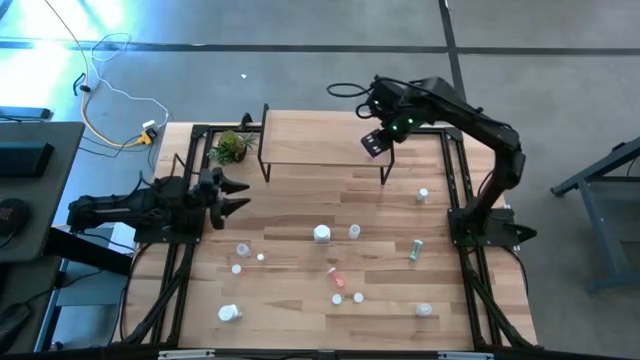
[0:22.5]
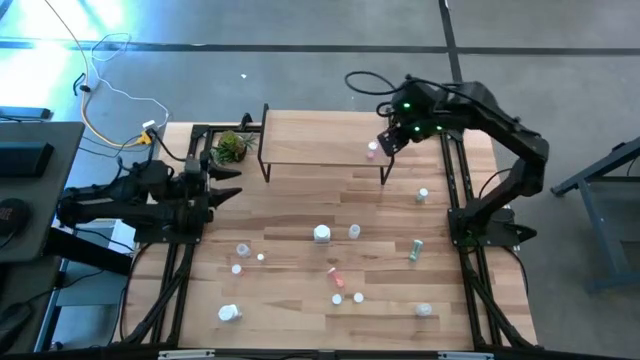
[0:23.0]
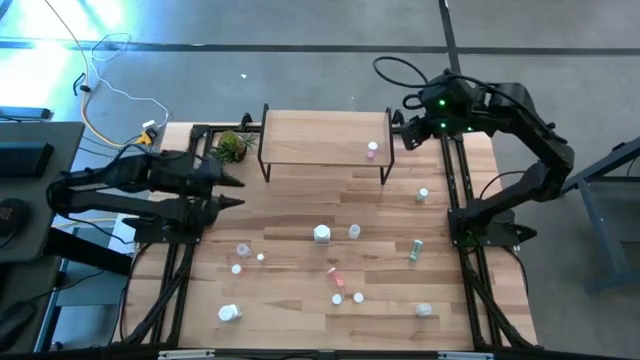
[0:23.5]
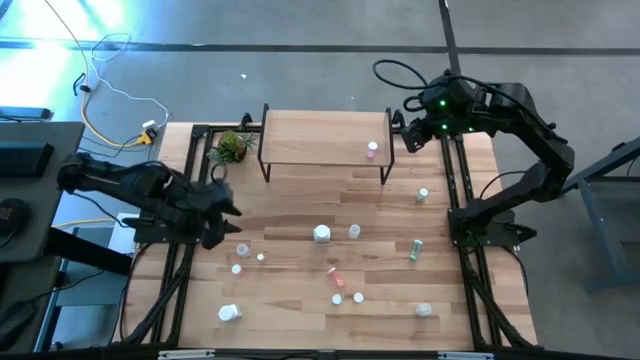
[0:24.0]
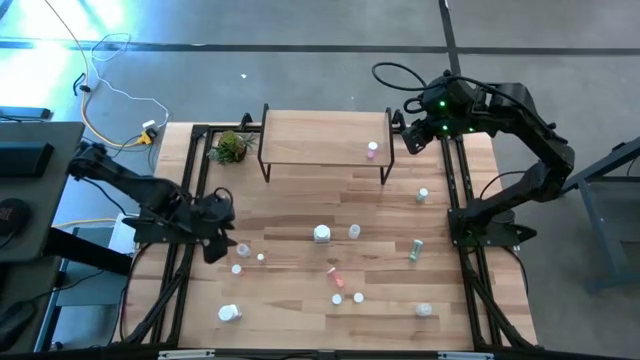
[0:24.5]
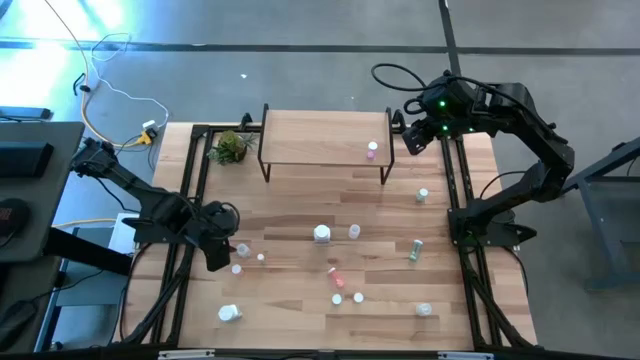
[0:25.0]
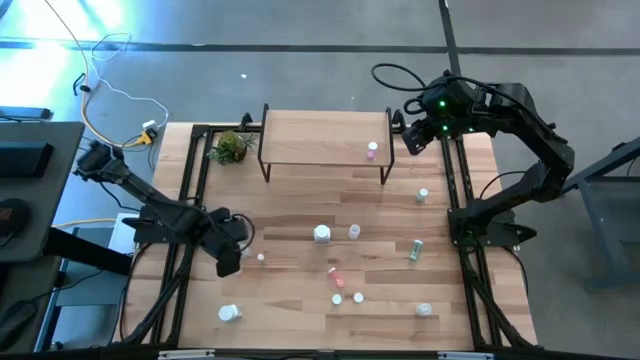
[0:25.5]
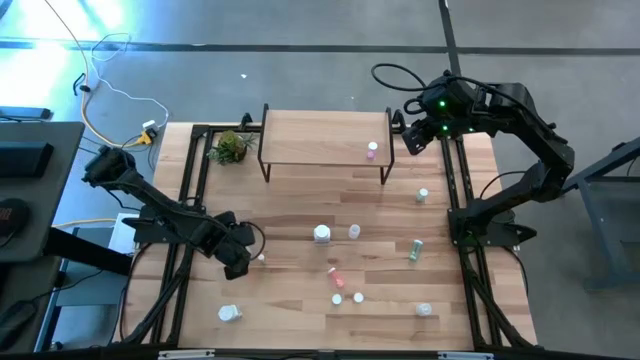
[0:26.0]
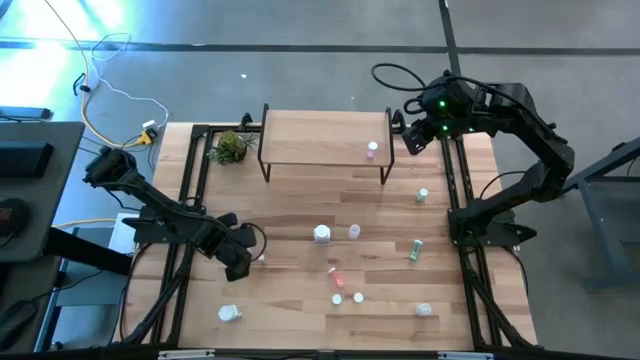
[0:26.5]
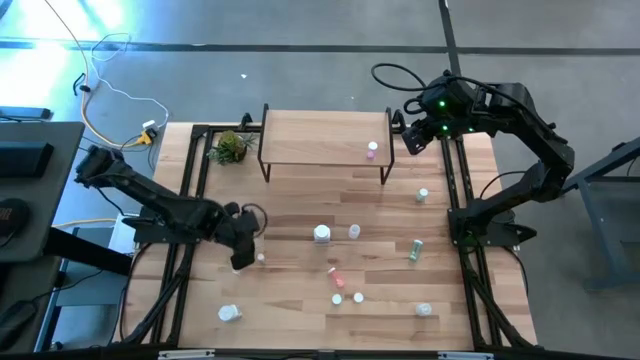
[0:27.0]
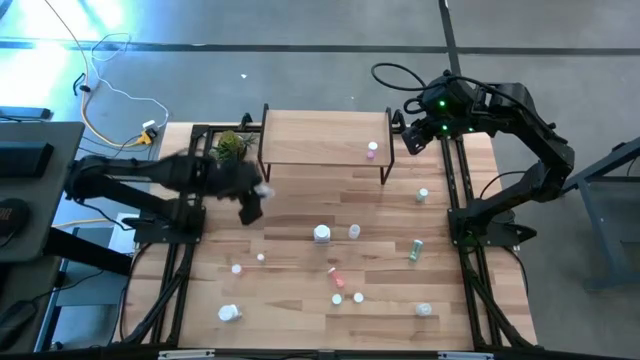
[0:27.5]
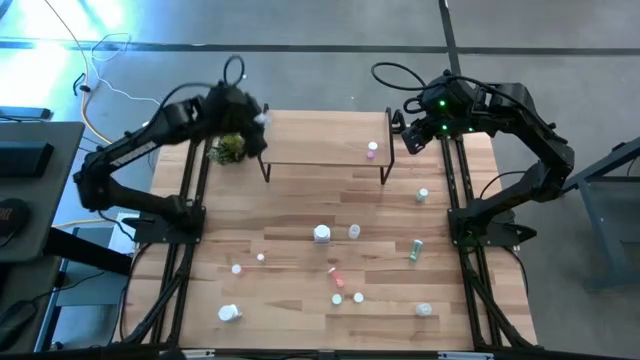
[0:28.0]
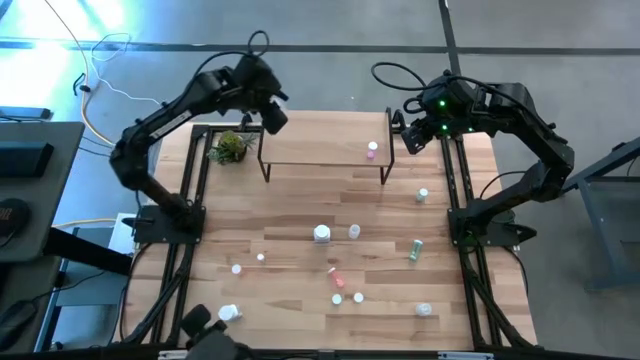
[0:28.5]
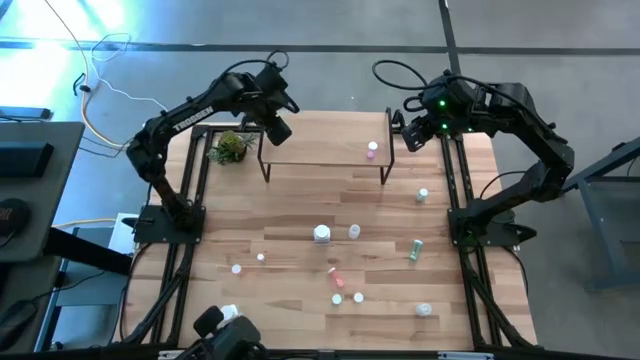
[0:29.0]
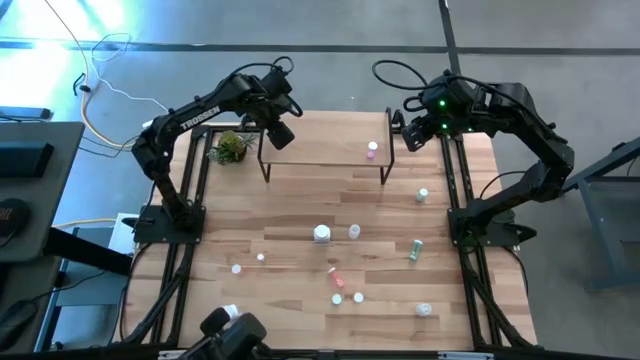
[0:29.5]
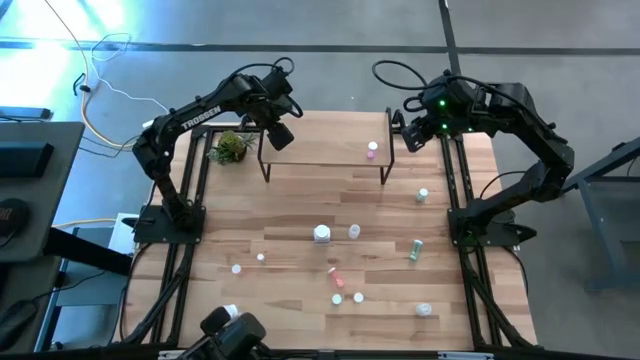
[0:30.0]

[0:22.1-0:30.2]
Task: Pick and place medicine bottles onto shelf by color
Put the right transparent pill bottle on the shelf

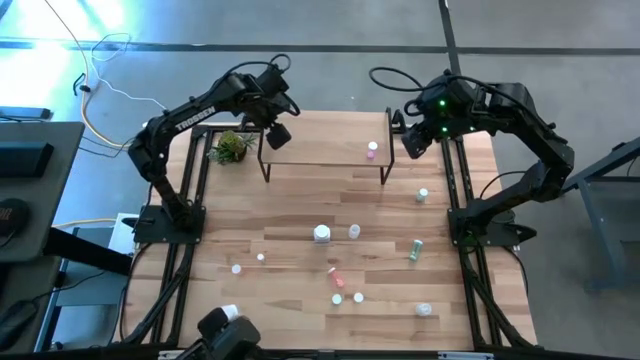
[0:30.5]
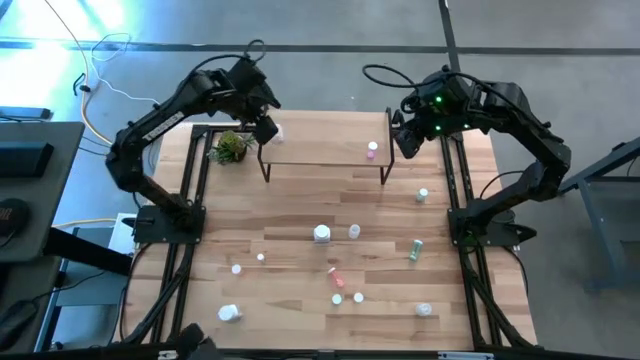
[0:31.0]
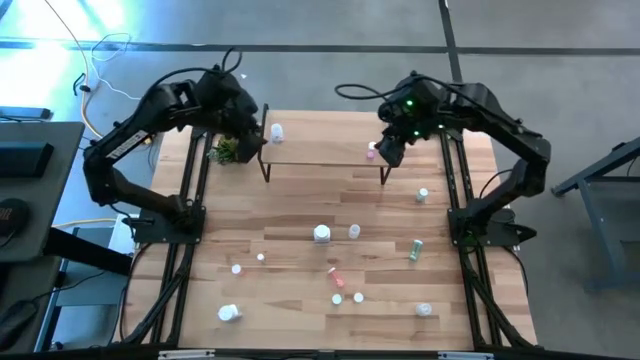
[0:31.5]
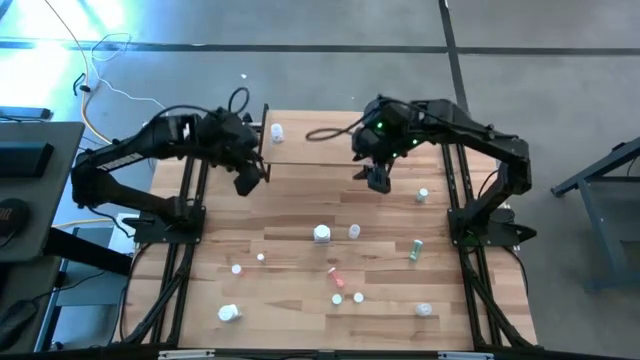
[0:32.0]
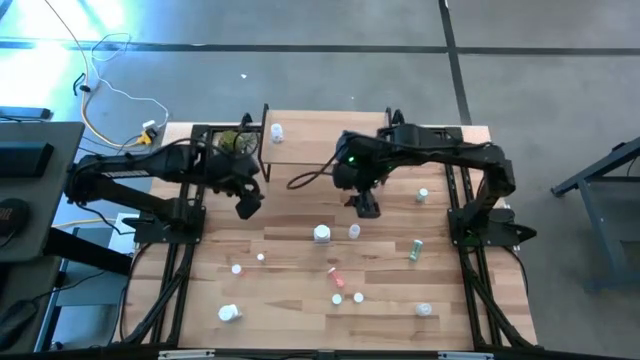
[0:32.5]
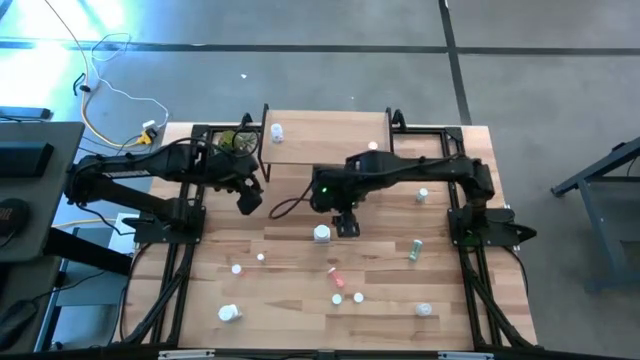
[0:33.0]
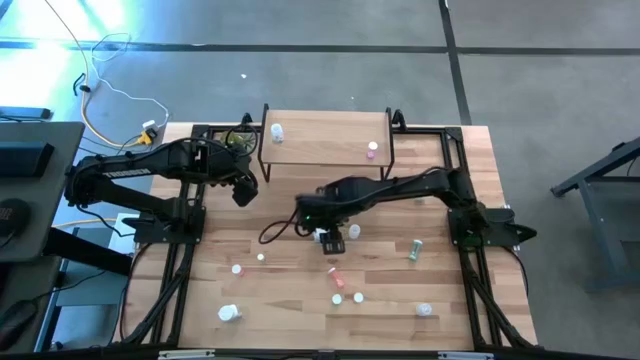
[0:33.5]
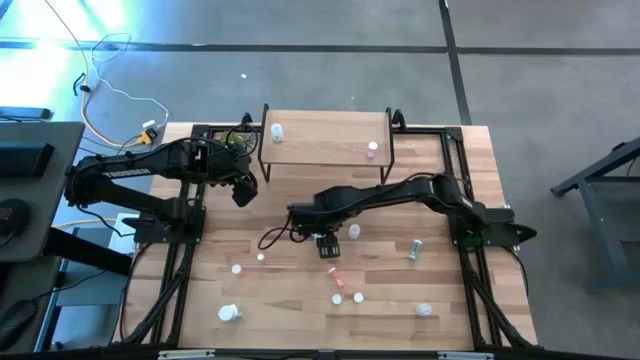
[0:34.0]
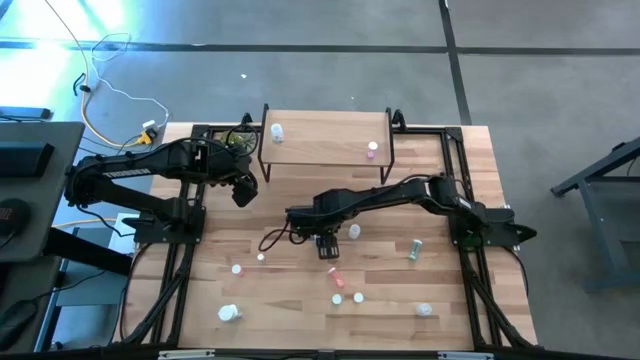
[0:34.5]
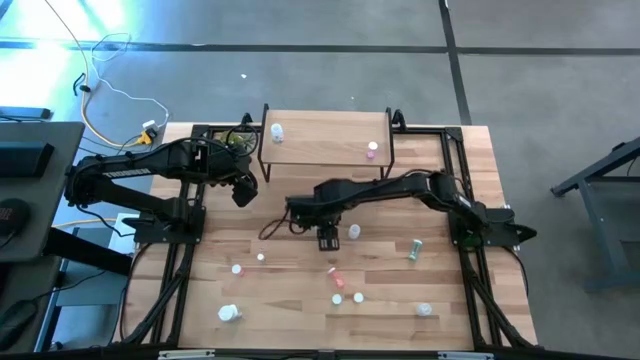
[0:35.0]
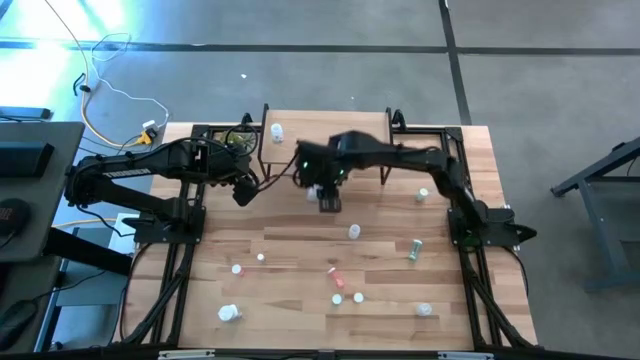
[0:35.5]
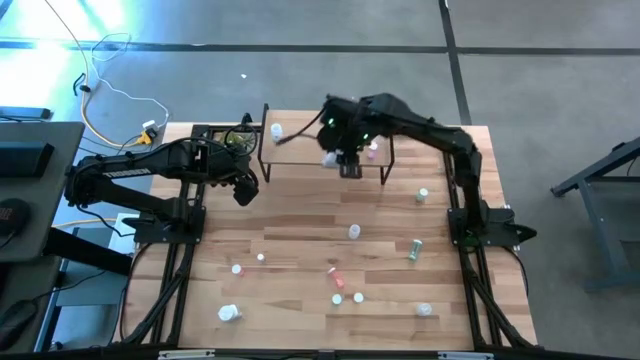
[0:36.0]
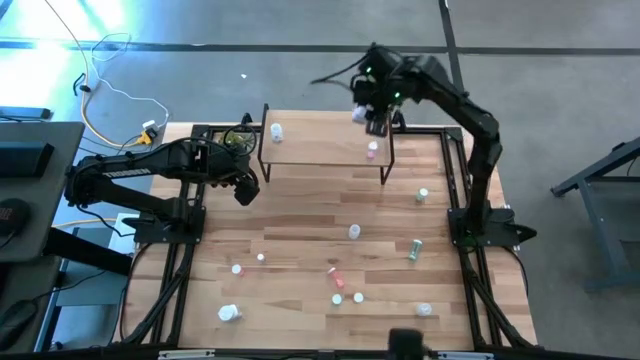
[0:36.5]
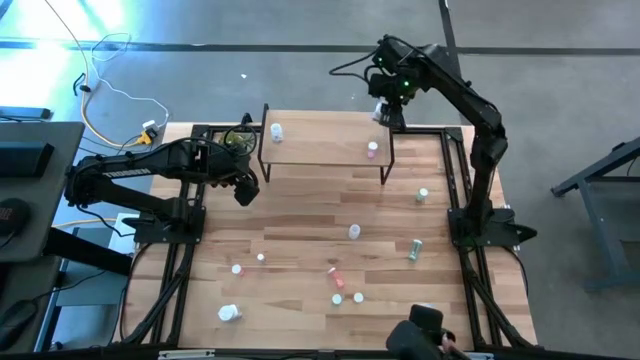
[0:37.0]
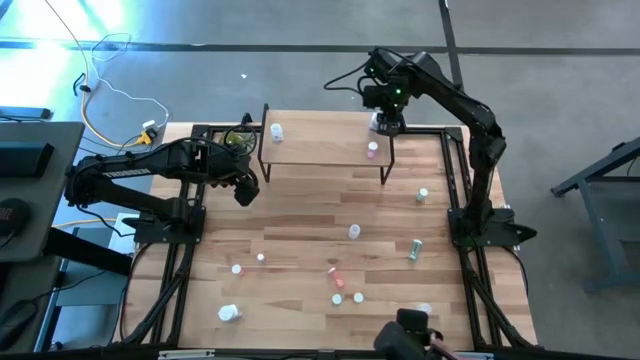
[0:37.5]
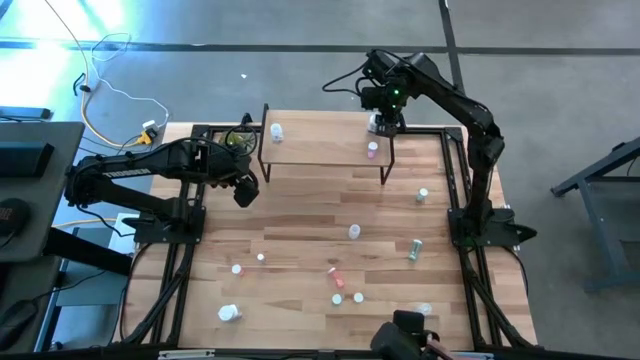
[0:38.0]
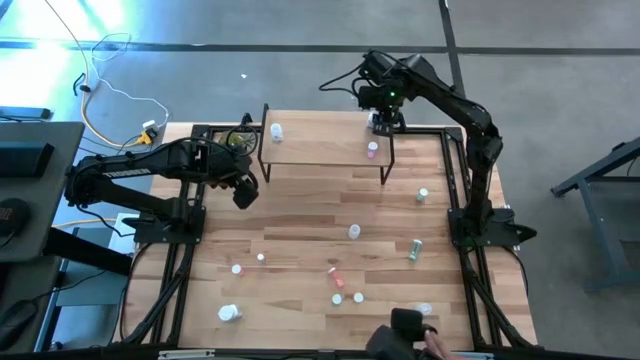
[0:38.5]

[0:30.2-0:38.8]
Put the top white medicine bottle on the shelf

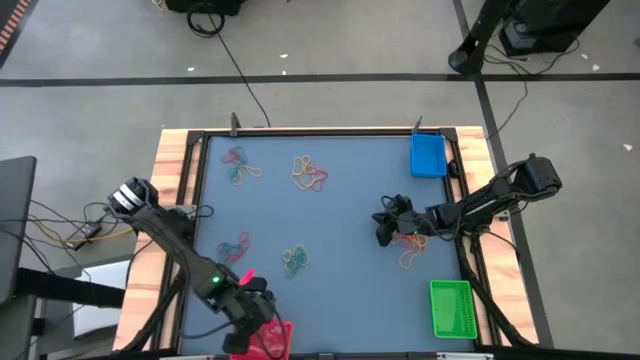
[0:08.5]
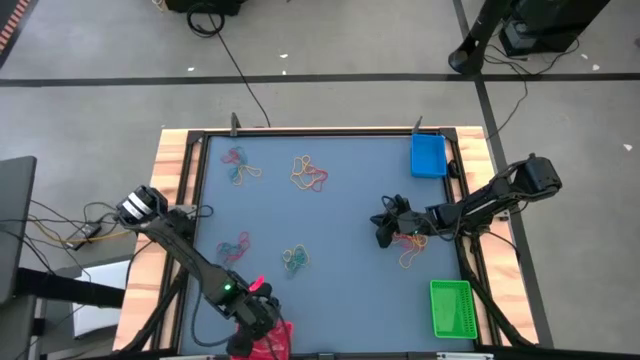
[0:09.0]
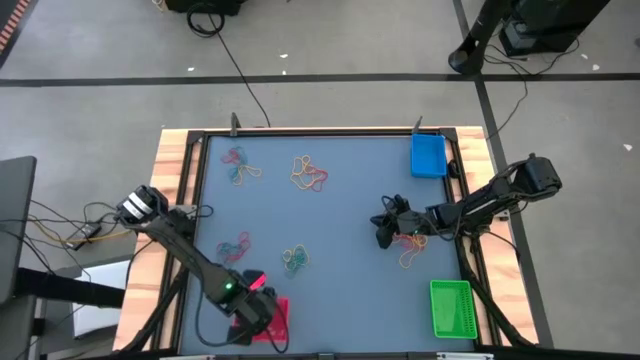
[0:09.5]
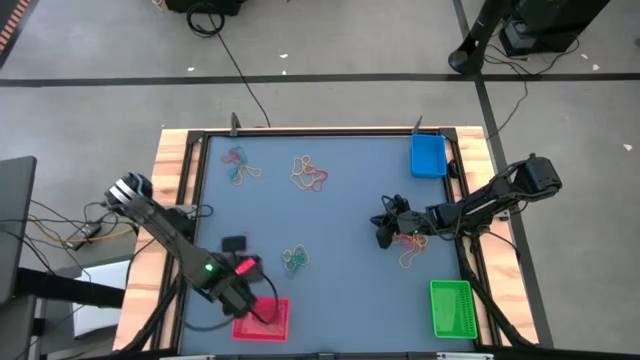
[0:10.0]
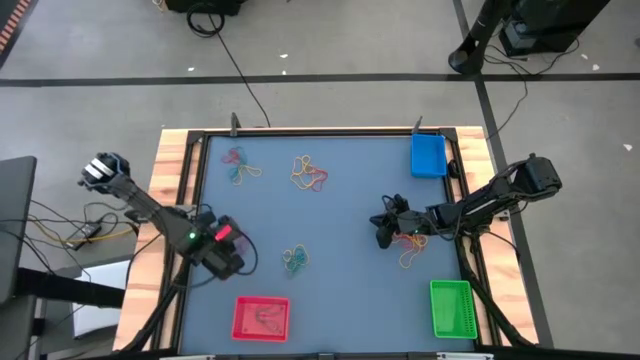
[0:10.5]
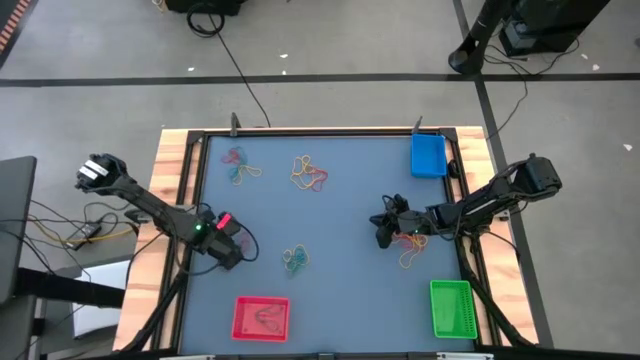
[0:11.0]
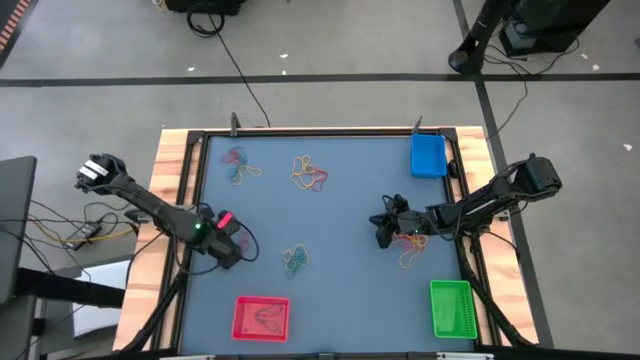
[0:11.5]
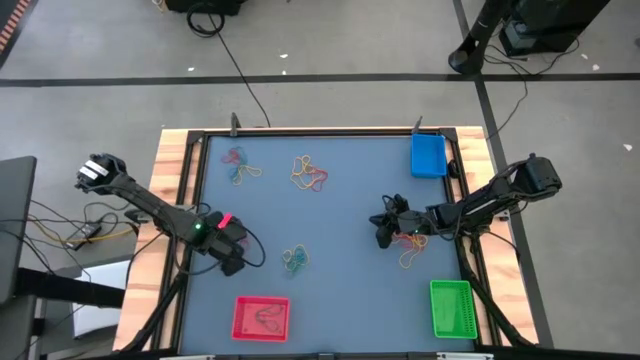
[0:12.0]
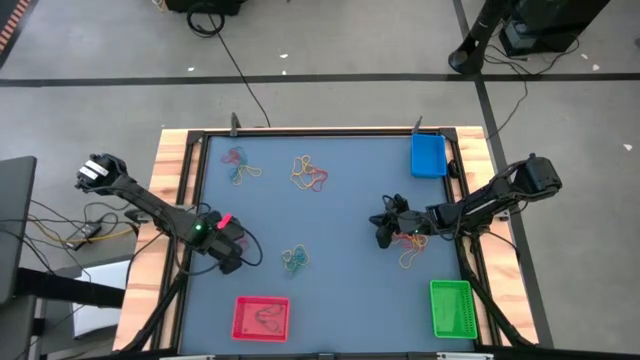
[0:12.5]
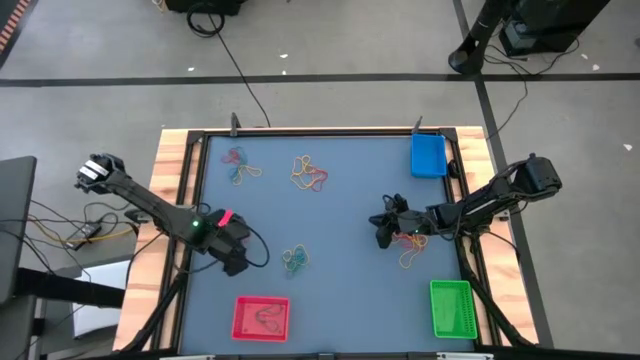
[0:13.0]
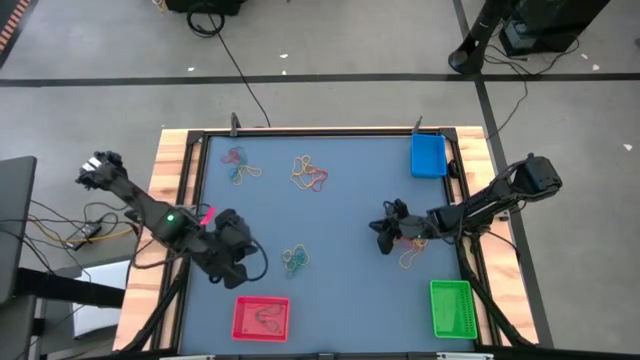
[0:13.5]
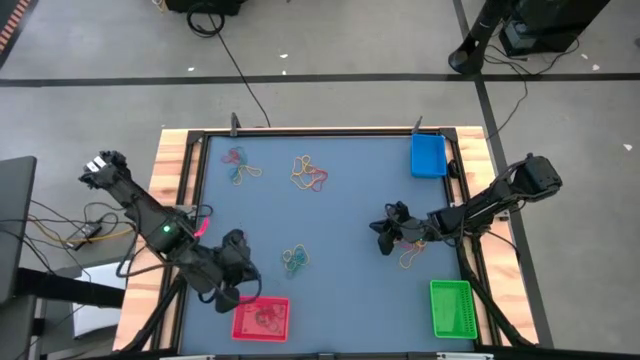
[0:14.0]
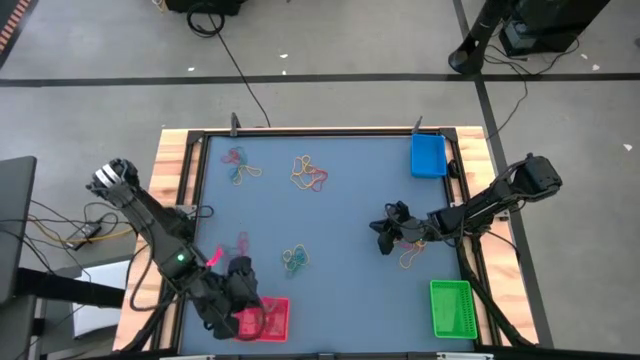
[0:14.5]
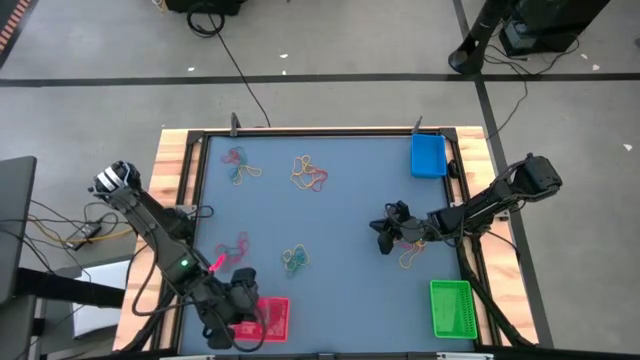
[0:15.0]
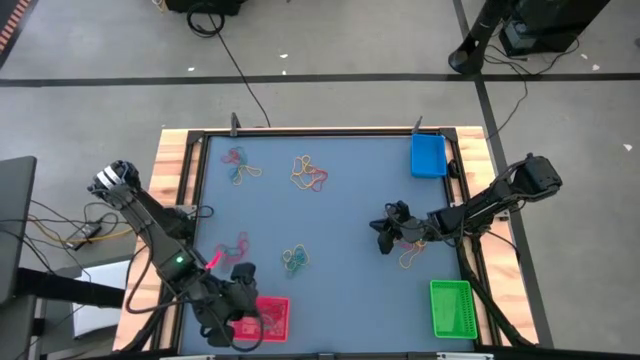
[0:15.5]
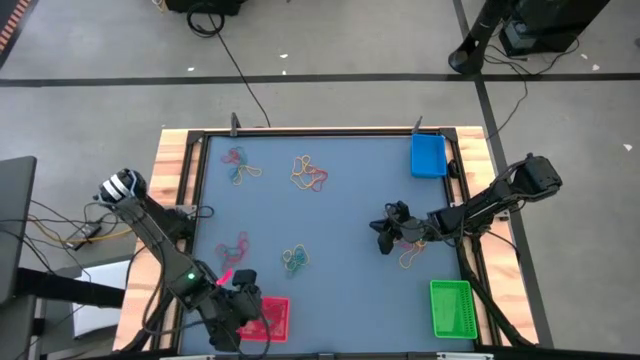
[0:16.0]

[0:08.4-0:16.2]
Task: Sort rubber bands into baskets
Put the blue rubber band into the red bin
